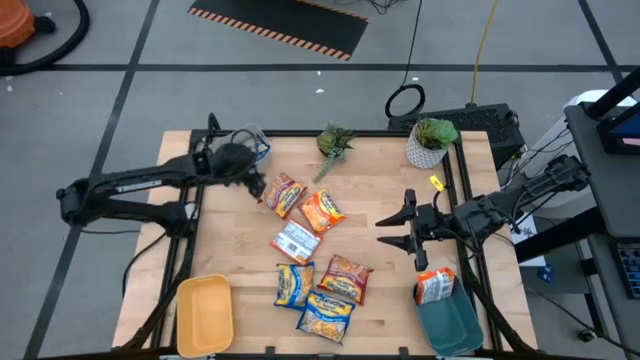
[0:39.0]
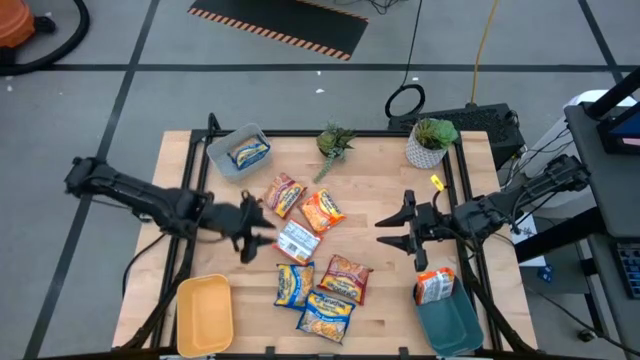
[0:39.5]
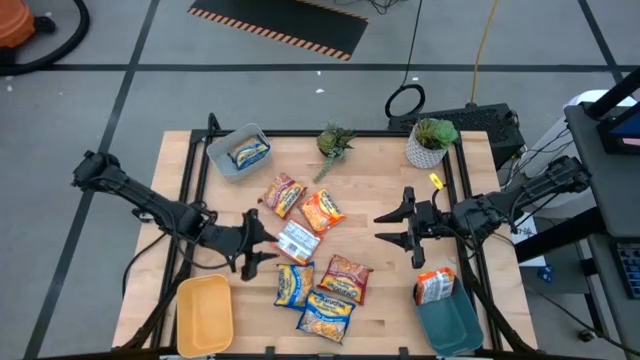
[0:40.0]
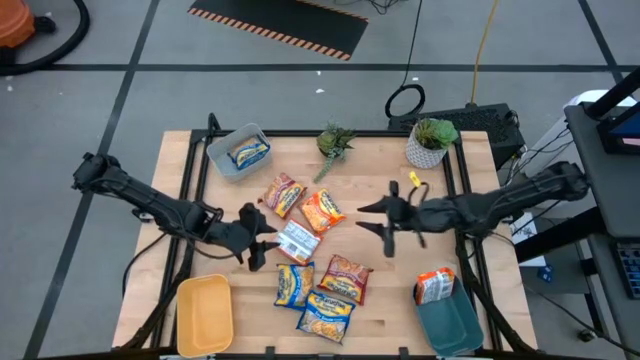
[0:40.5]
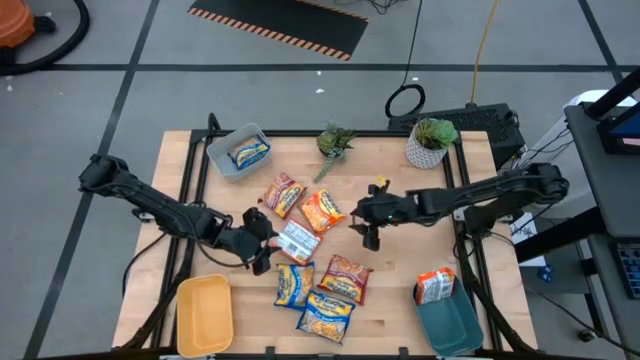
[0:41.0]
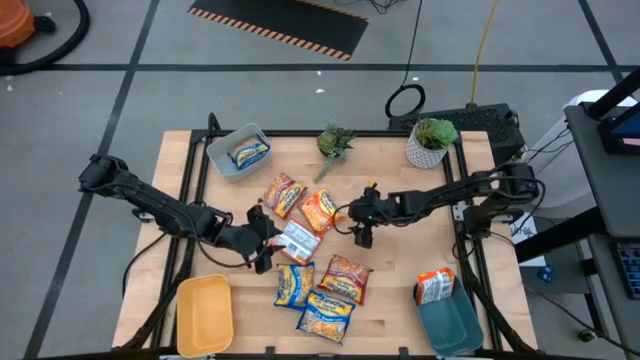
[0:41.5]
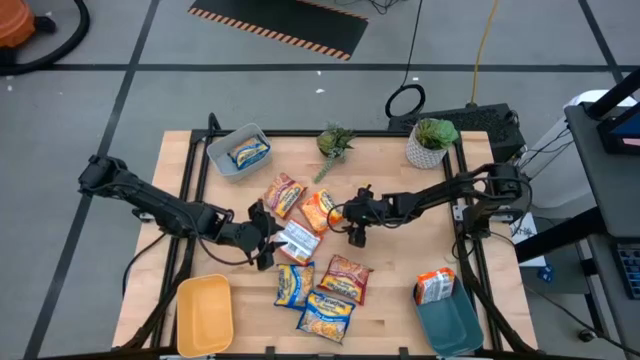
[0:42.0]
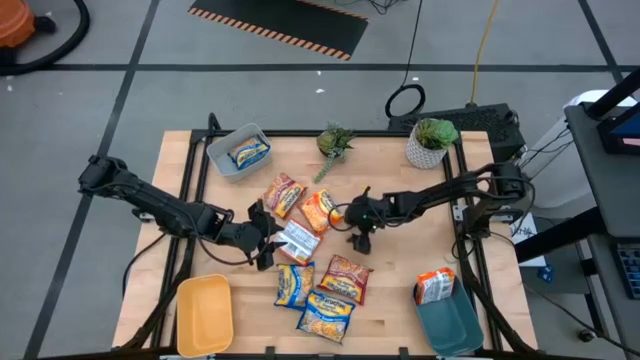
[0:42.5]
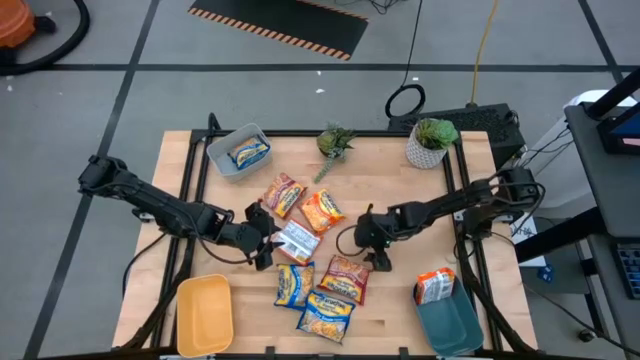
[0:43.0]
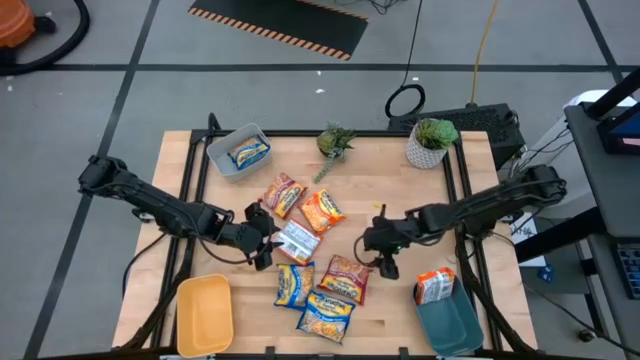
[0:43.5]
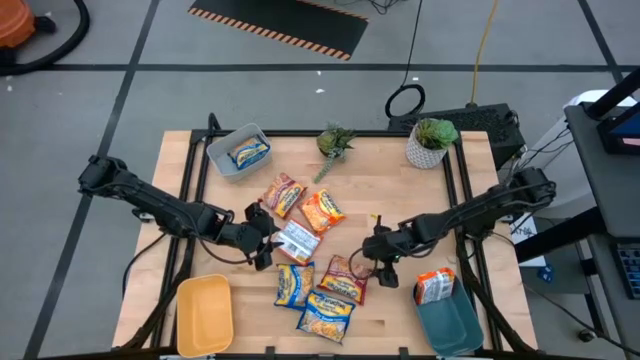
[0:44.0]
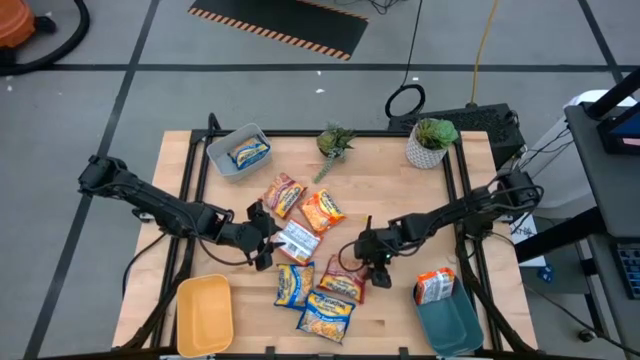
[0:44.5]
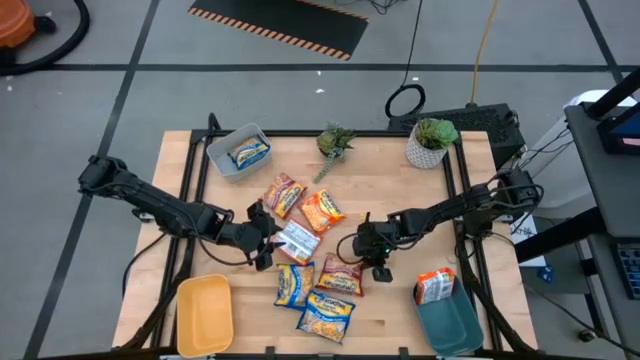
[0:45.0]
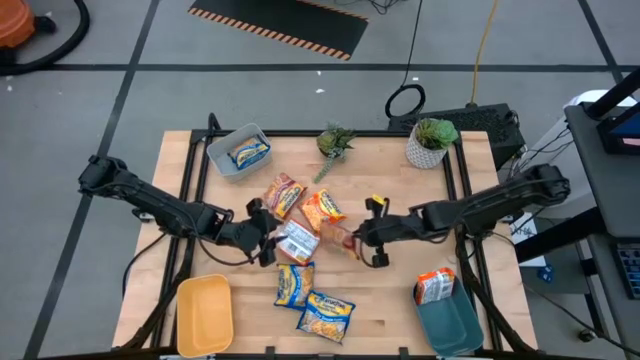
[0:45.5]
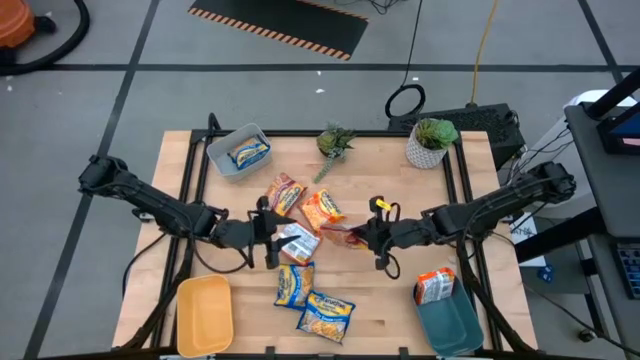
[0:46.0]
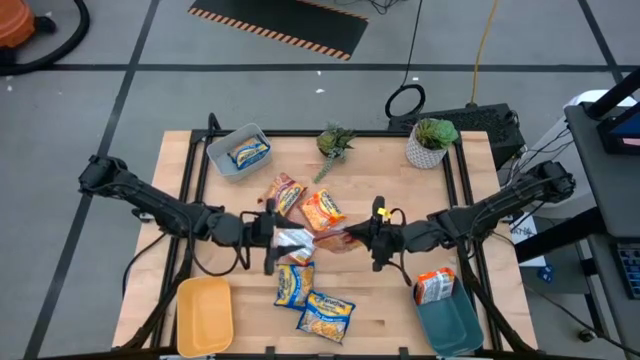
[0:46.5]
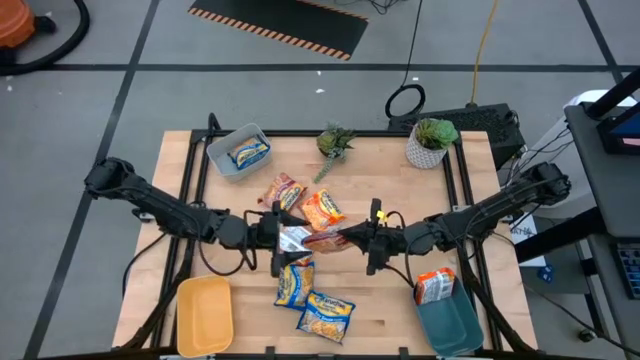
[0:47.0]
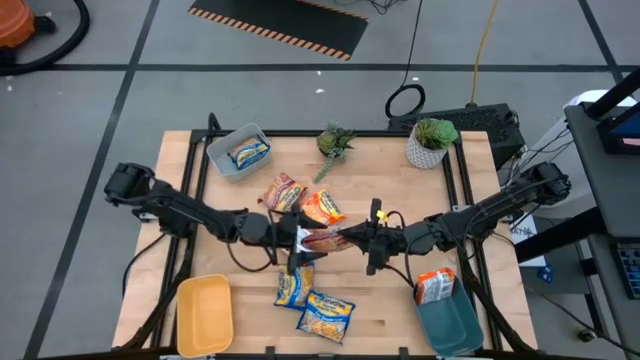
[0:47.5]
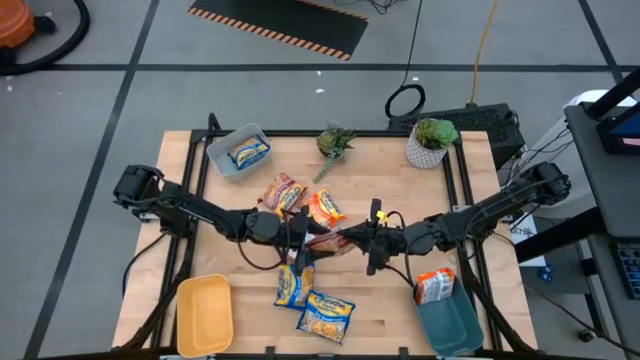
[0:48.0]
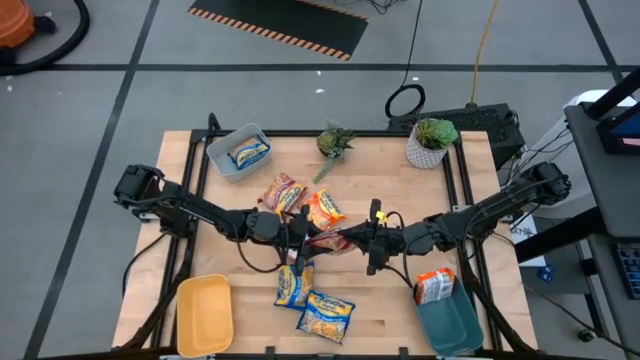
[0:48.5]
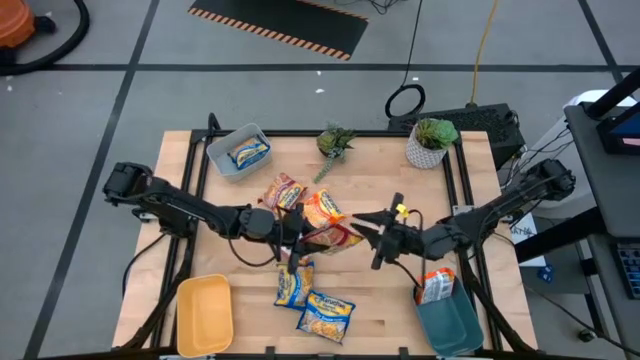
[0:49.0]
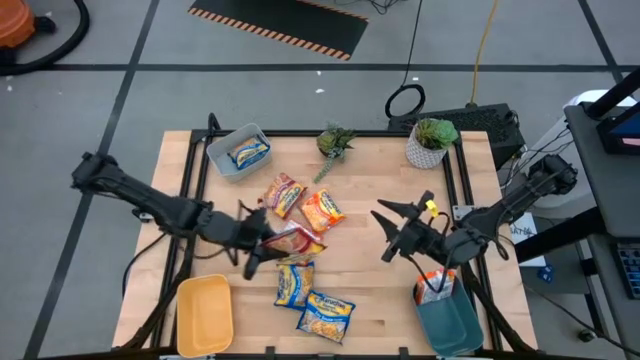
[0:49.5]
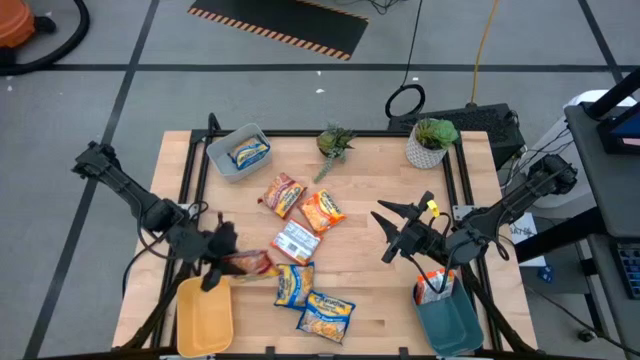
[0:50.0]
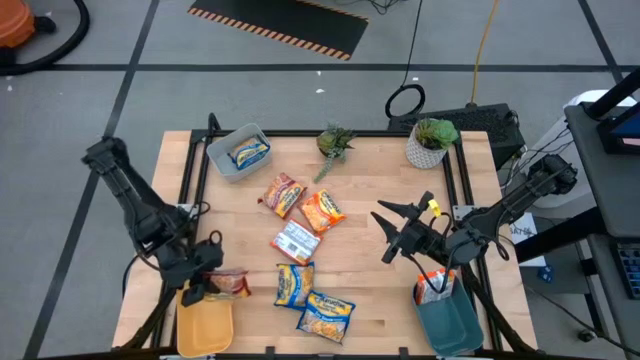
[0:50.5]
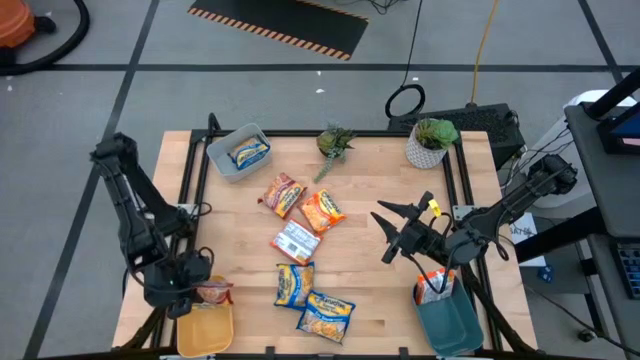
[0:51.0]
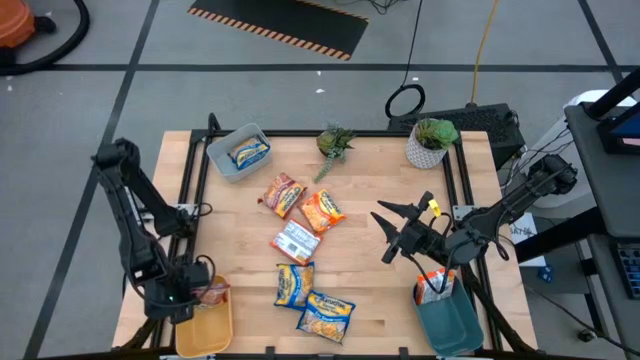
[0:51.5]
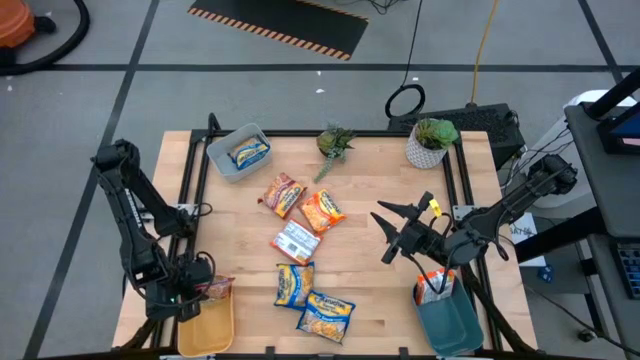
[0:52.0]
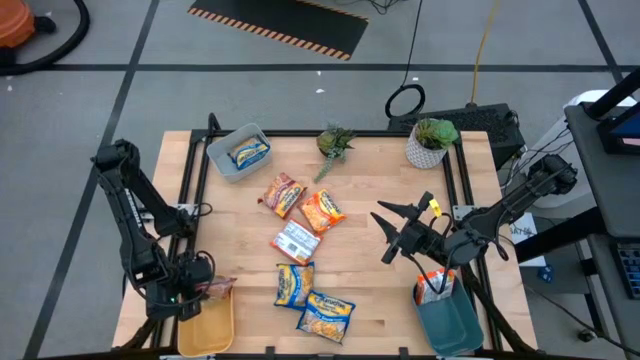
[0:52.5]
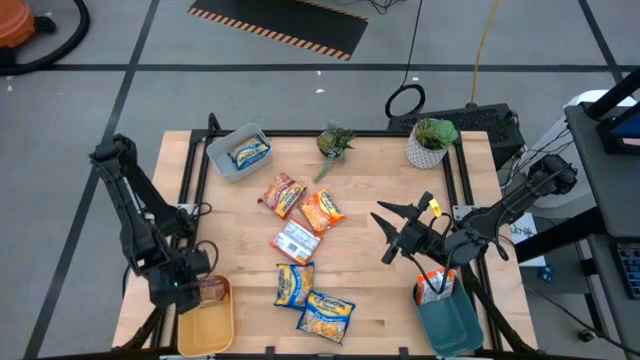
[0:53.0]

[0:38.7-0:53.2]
Task: Sort Maruchan noodles
Put the bottom red noodle pack into the yellow bin

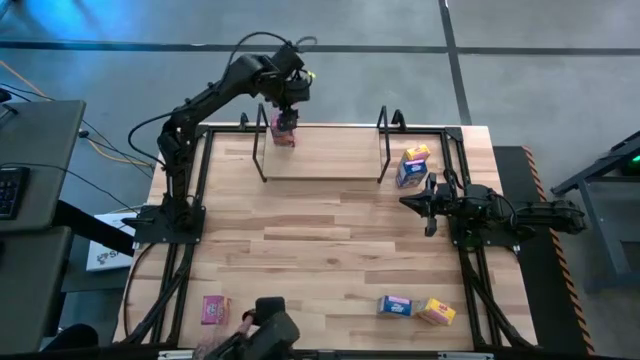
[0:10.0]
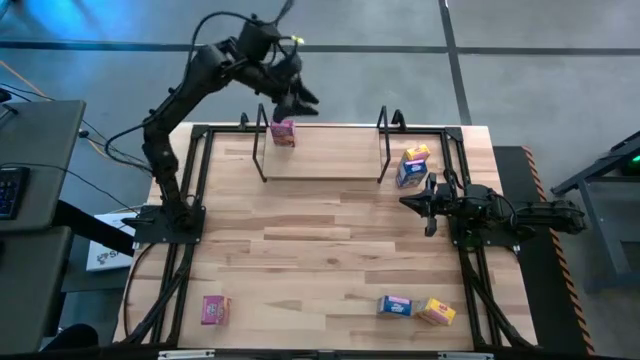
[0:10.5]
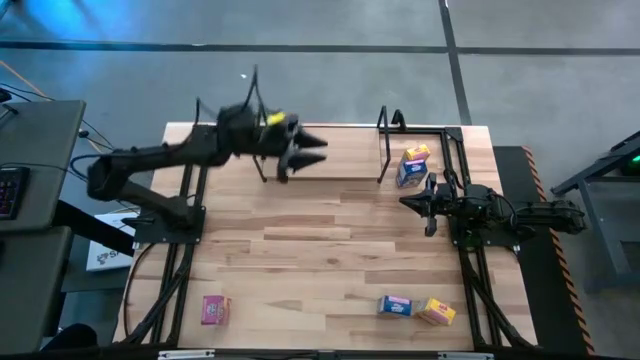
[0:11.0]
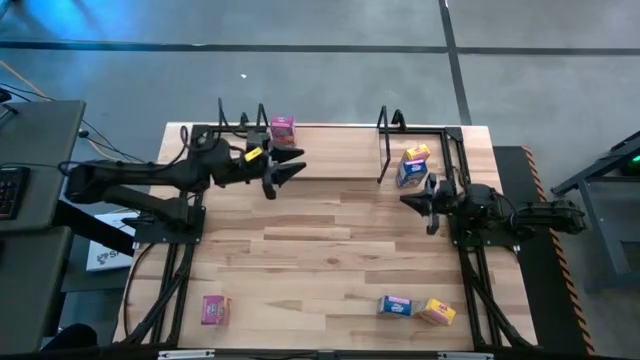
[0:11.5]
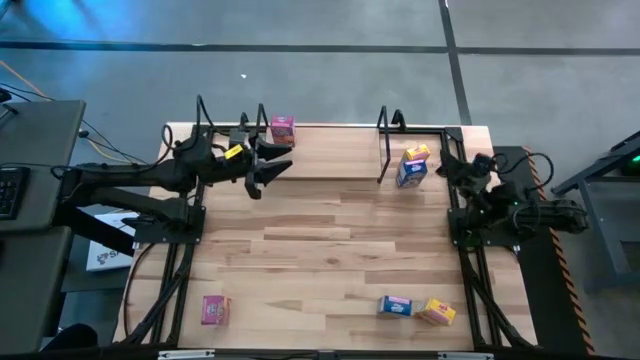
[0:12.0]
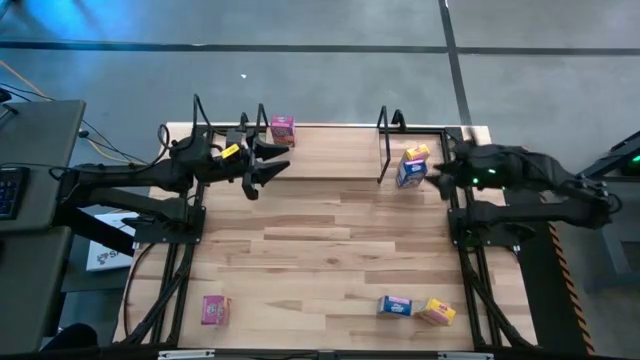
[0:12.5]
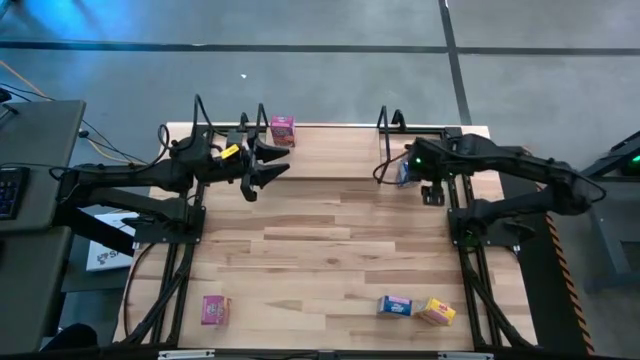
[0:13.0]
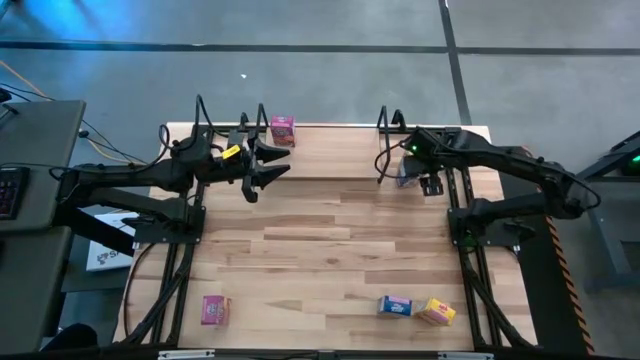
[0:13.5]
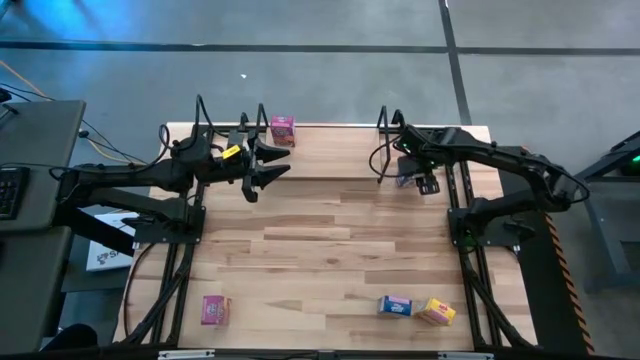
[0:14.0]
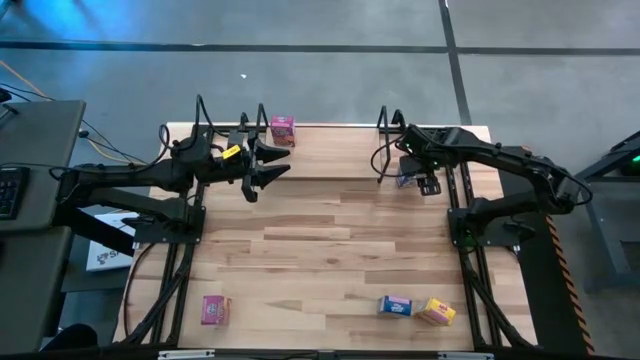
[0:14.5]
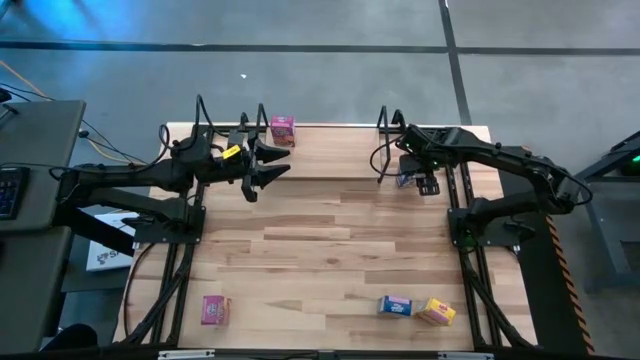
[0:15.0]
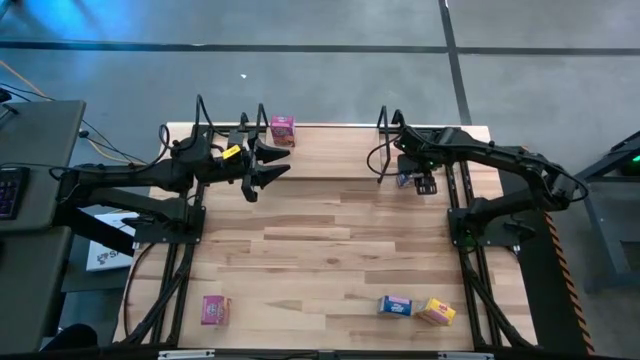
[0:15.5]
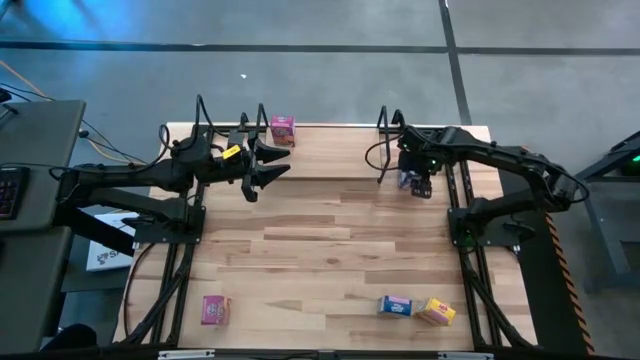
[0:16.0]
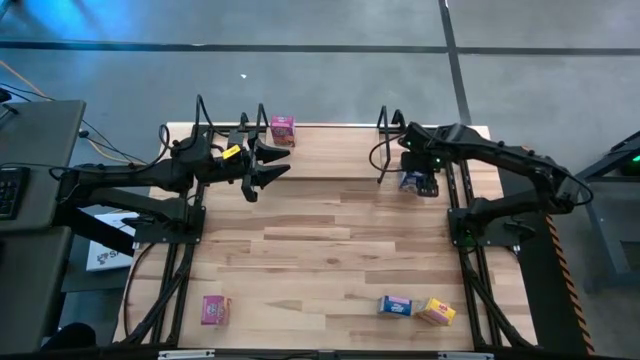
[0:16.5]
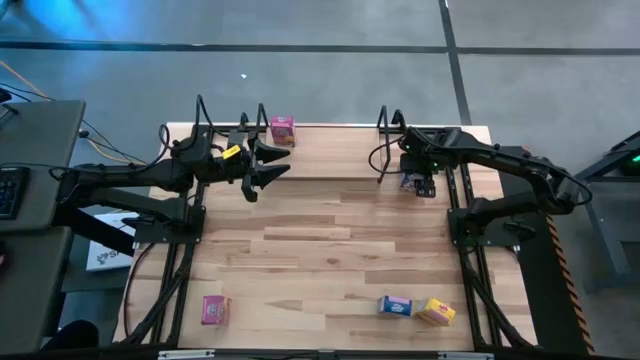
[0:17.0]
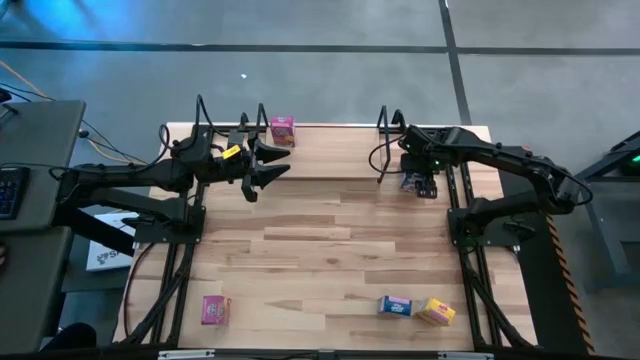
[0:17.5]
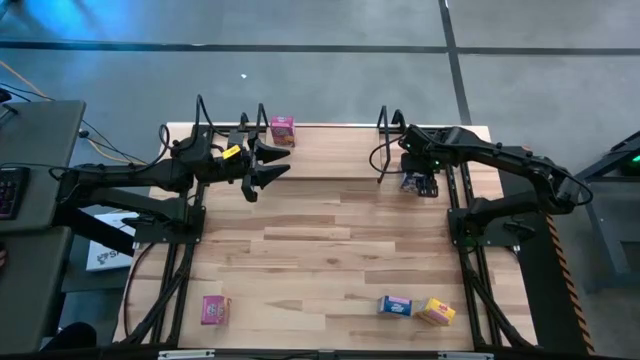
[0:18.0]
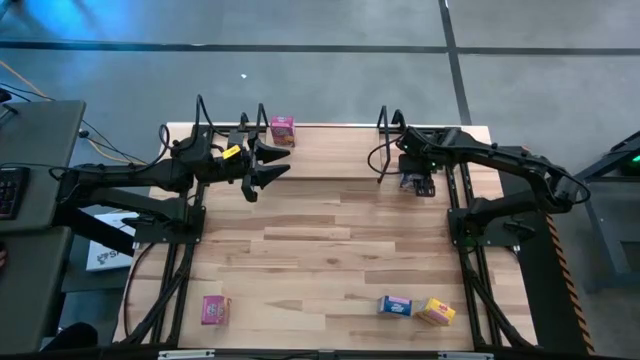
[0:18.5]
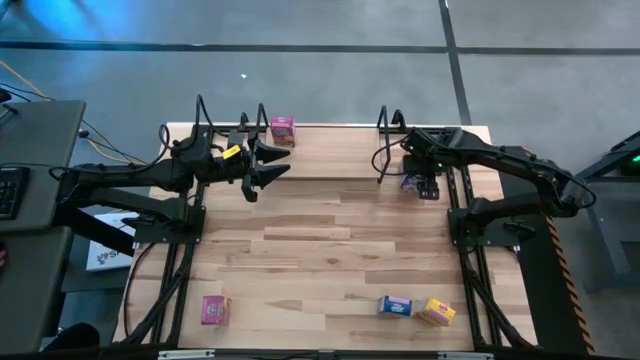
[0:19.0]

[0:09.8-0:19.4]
Task: Stack cereal on shelf
Put the top blue cereal box on the shelf
